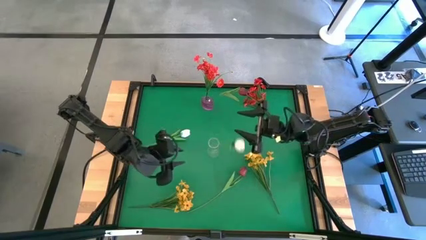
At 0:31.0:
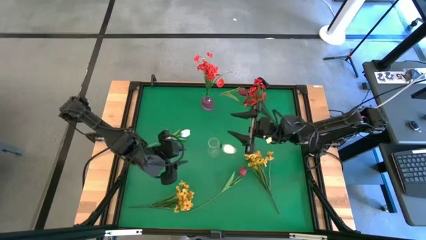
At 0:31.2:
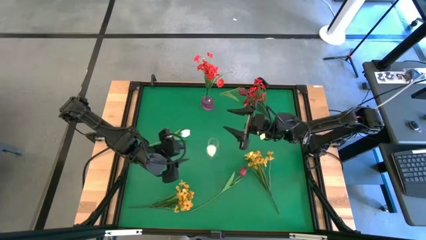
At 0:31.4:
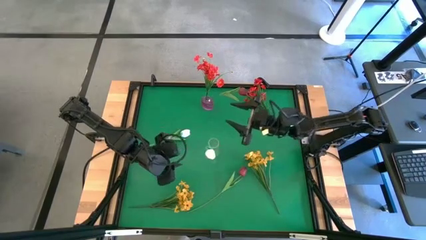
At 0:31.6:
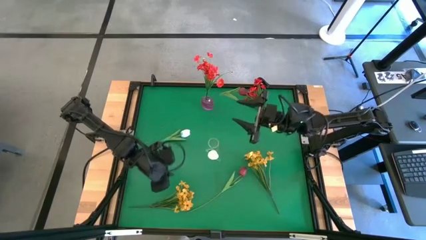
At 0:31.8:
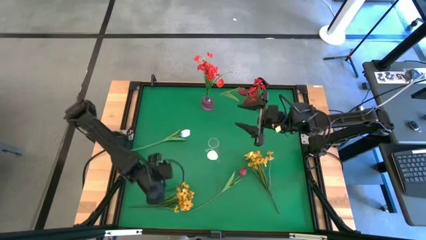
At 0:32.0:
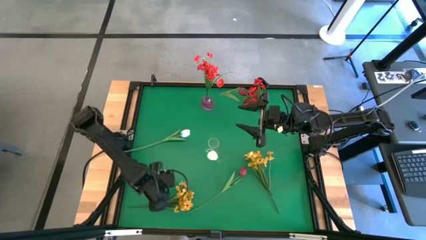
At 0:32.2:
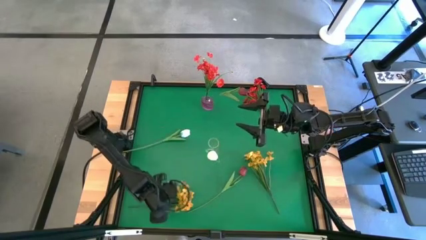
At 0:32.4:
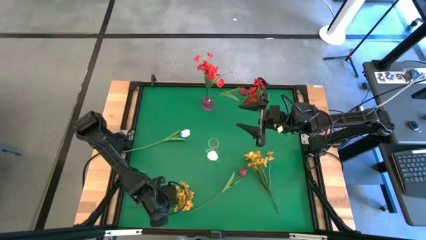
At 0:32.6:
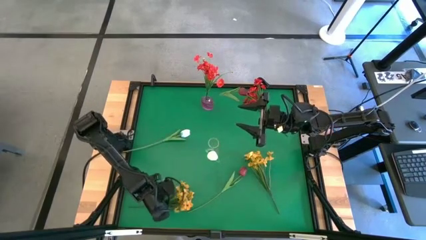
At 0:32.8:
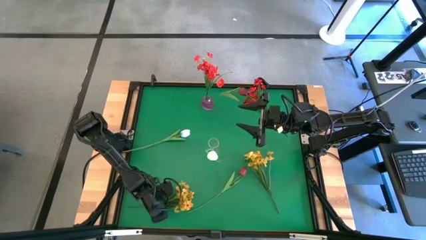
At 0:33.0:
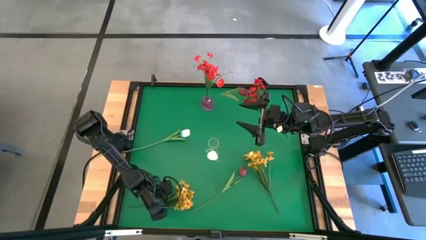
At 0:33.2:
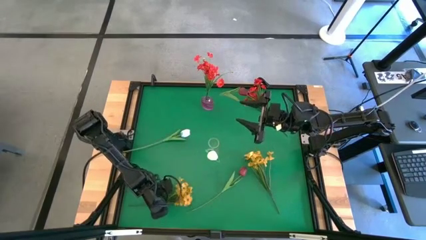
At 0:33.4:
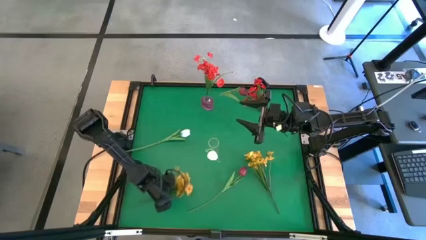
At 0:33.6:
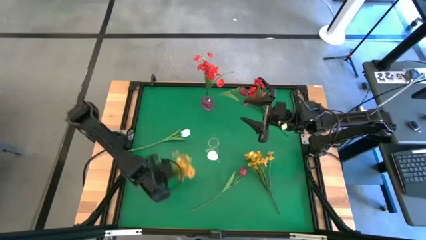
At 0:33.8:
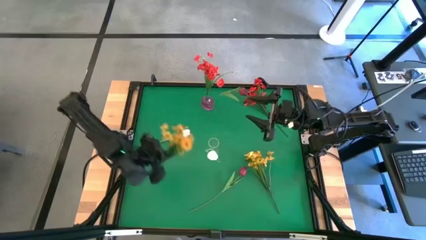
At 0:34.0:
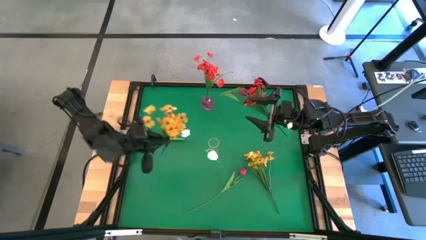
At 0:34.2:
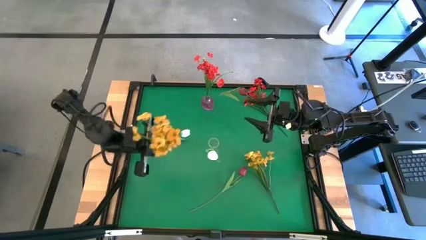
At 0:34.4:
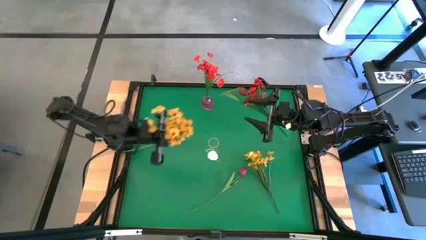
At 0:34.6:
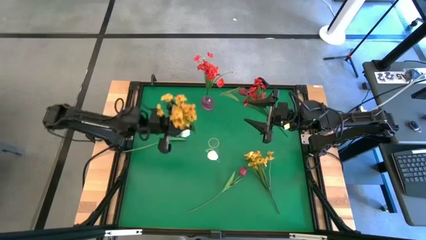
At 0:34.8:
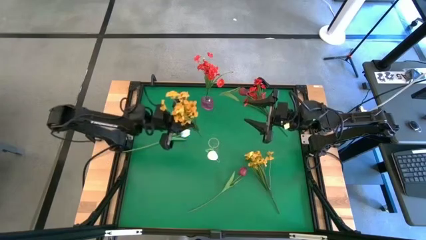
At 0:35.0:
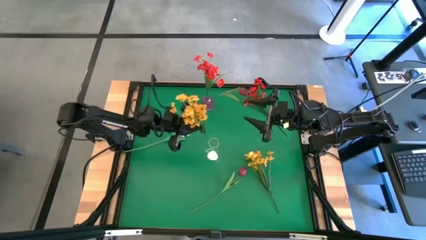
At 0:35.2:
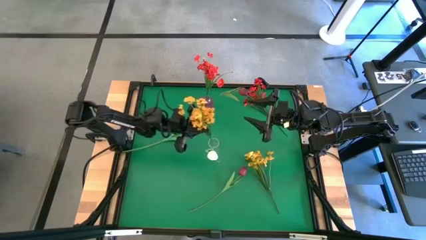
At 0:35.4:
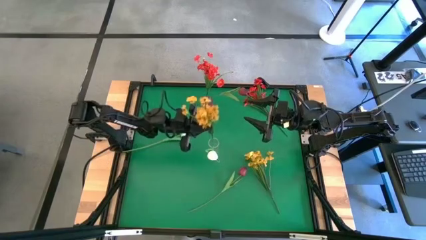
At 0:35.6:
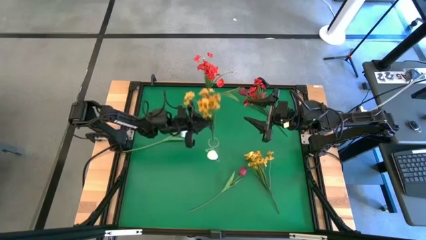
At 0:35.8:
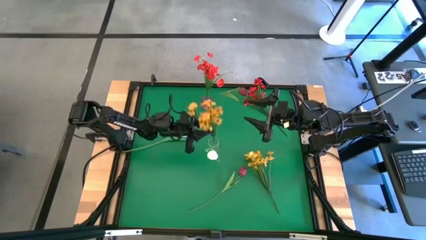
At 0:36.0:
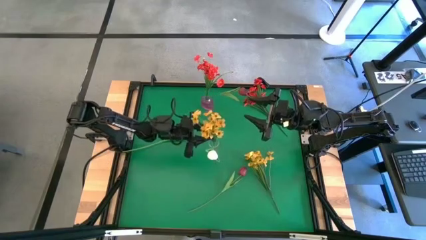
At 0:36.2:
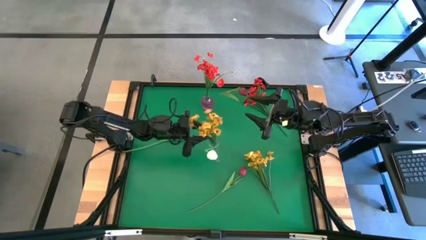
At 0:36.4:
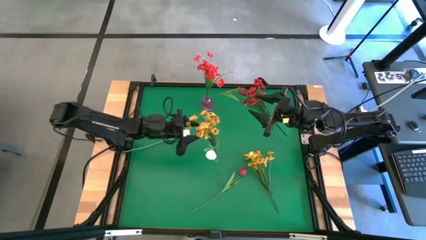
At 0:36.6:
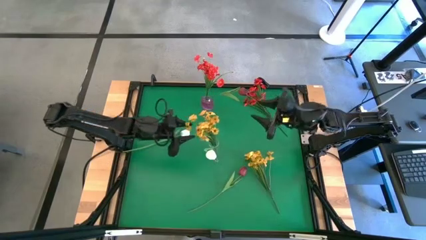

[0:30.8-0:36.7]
Task: Sort flowers into vase by color
Put the left yellow flowers into the transparent vase

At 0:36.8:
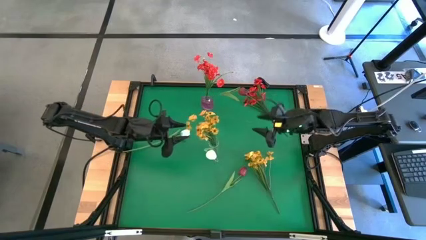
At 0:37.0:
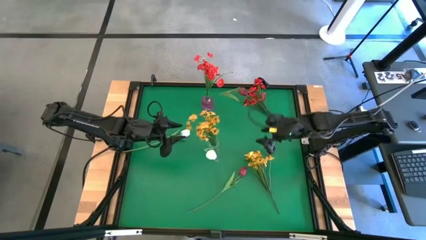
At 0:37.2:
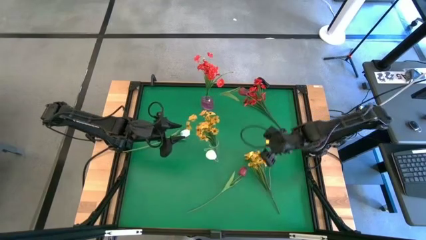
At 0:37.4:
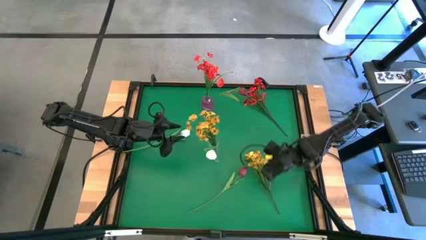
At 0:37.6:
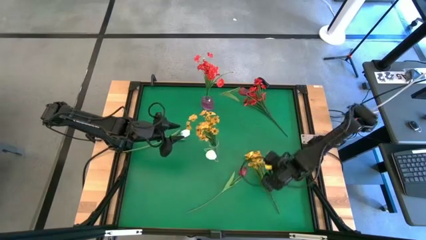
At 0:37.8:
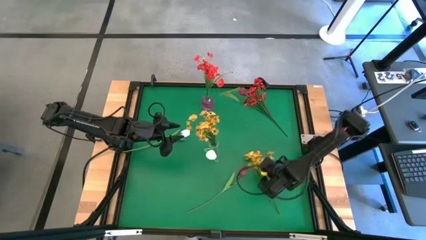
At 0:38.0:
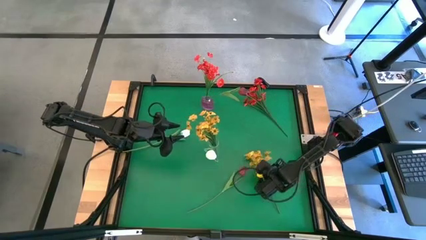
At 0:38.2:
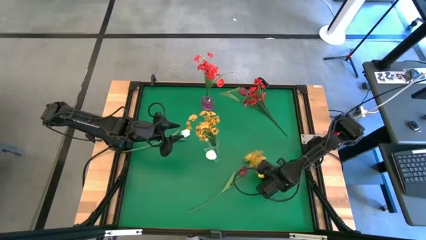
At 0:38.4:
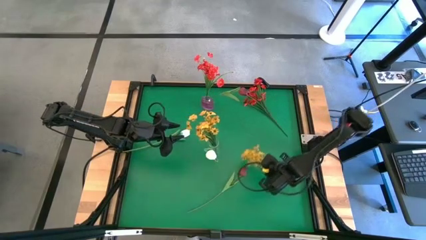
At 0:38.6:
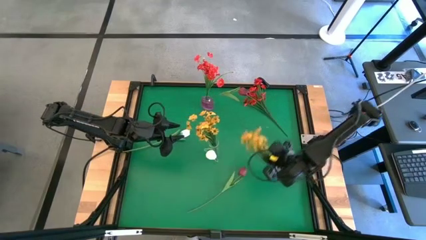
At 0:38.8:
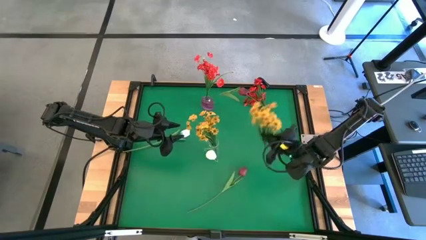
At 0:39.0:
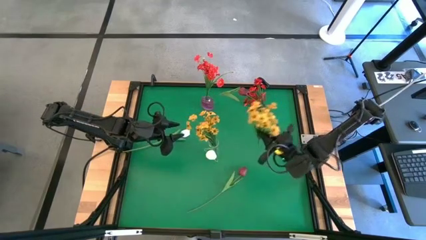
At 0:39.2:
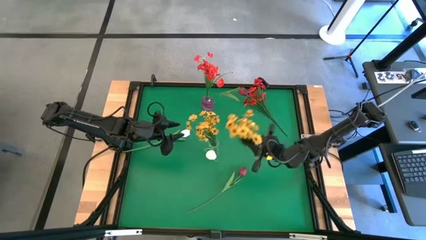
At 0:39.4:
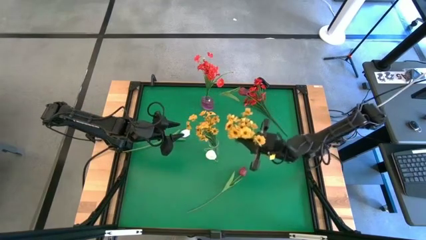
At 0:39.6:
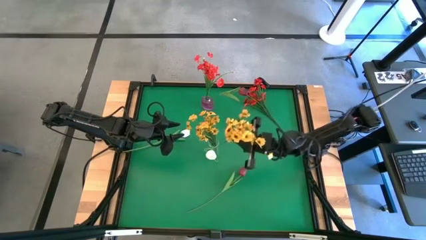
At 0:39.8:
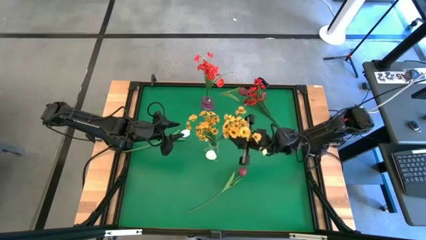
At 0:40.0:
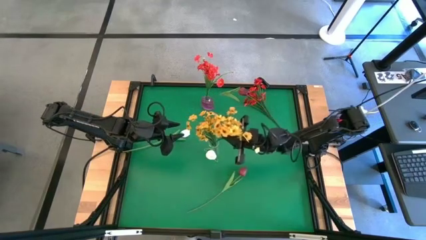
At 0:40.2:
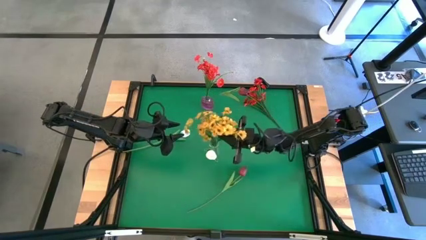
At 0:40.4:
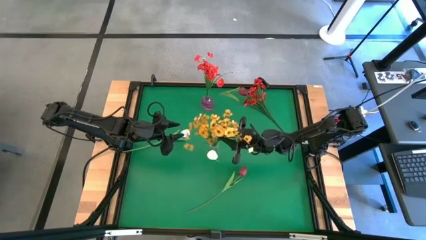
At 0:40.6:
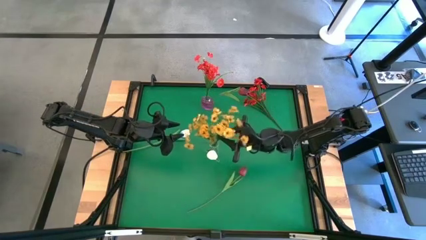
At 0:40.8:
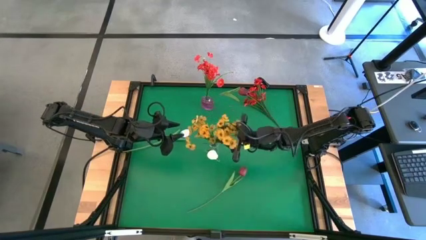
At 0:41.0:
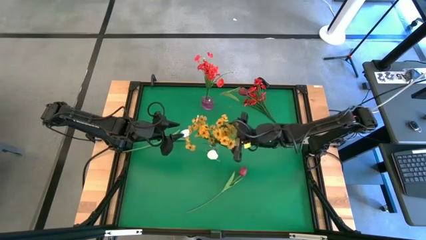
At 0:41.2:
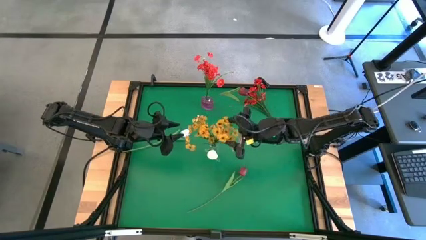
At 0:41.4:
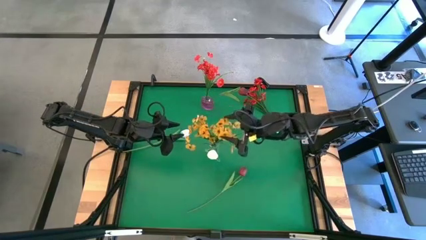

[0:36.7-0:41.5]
Put the yellow flowers into the transparent vase

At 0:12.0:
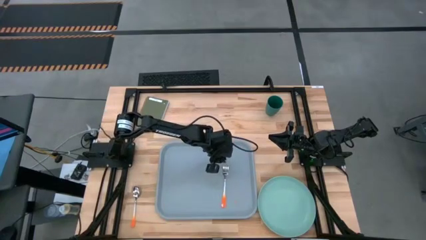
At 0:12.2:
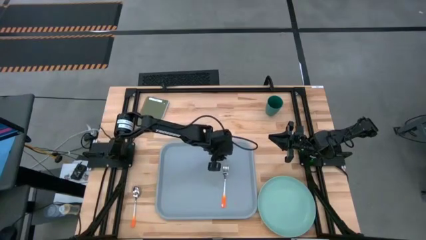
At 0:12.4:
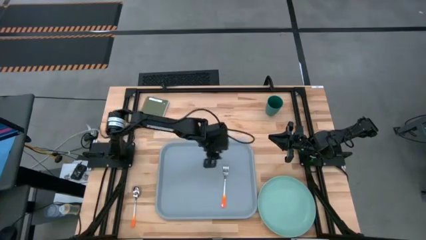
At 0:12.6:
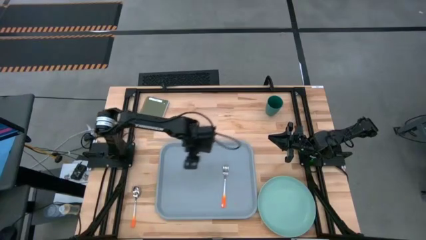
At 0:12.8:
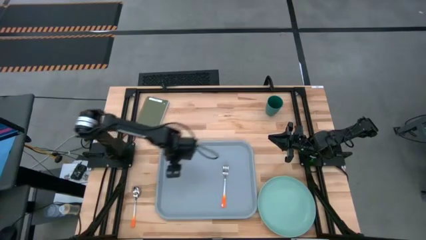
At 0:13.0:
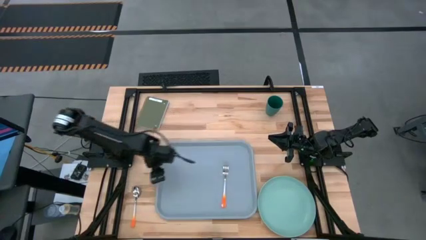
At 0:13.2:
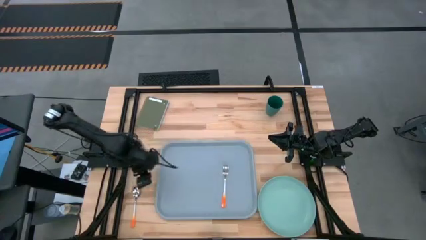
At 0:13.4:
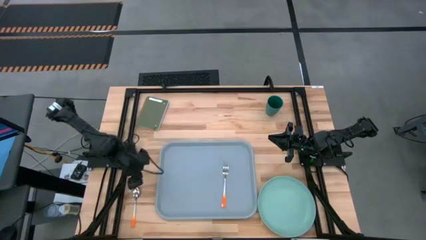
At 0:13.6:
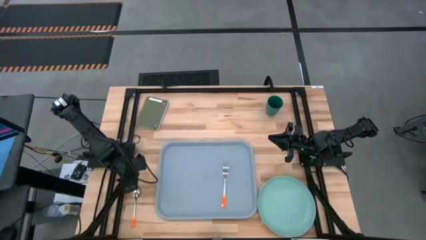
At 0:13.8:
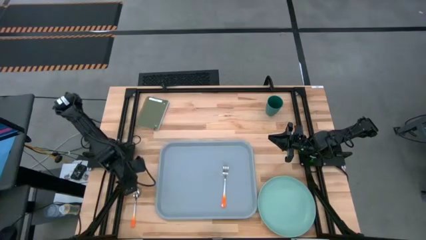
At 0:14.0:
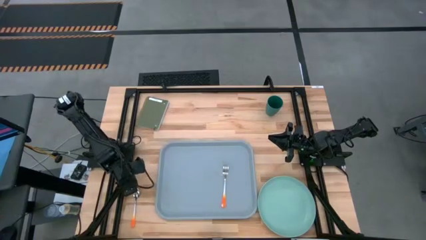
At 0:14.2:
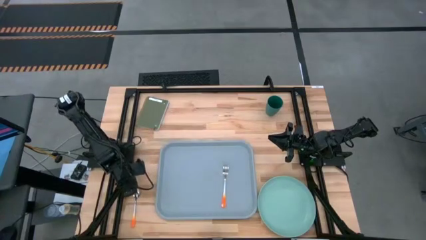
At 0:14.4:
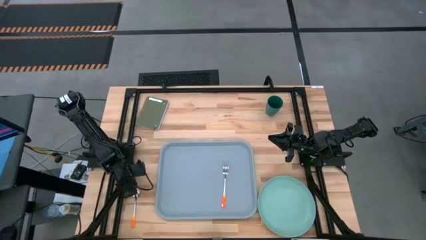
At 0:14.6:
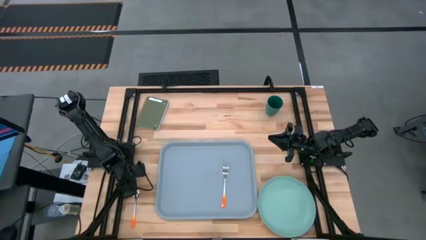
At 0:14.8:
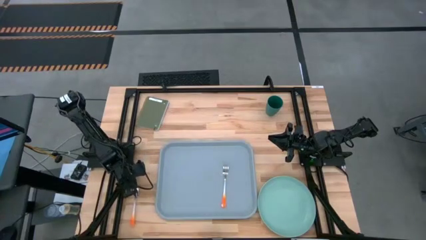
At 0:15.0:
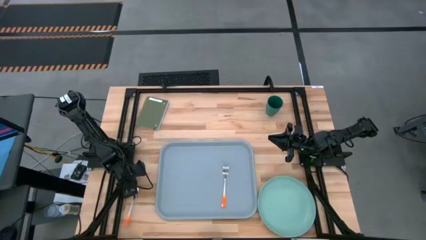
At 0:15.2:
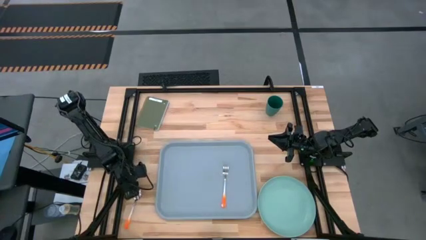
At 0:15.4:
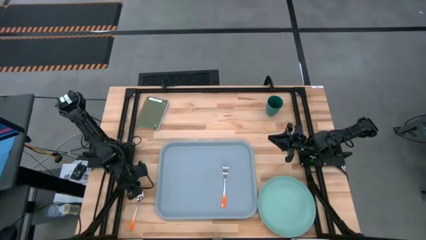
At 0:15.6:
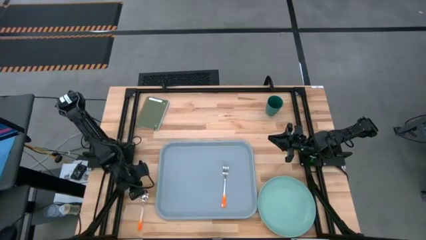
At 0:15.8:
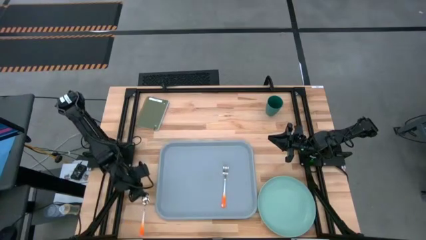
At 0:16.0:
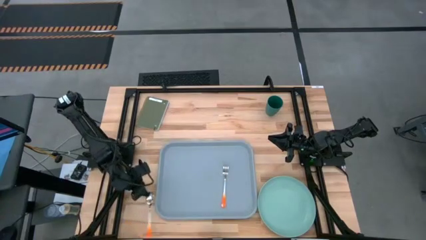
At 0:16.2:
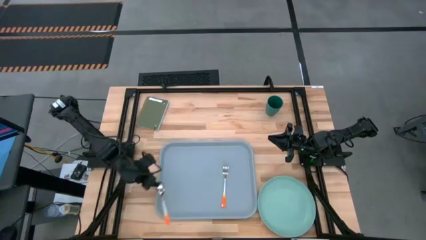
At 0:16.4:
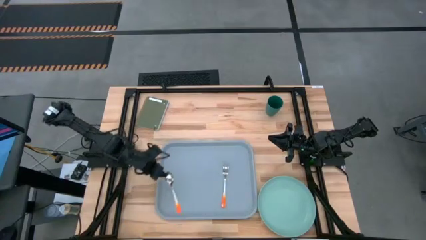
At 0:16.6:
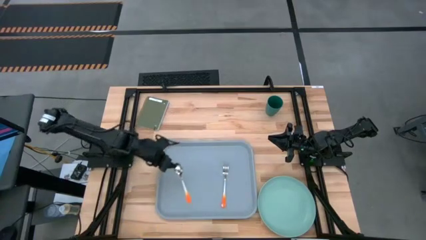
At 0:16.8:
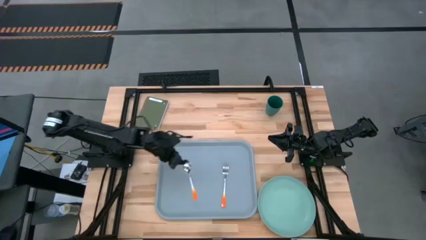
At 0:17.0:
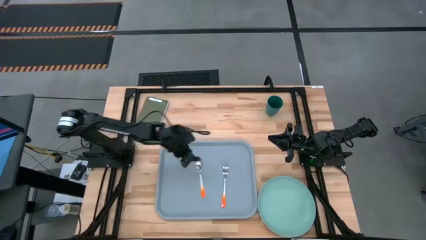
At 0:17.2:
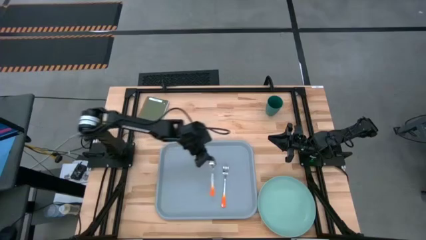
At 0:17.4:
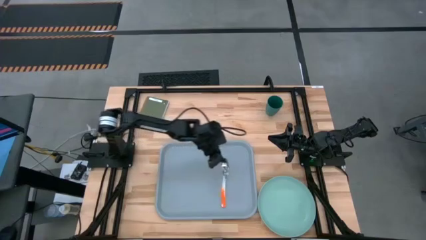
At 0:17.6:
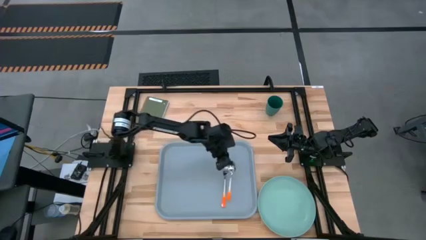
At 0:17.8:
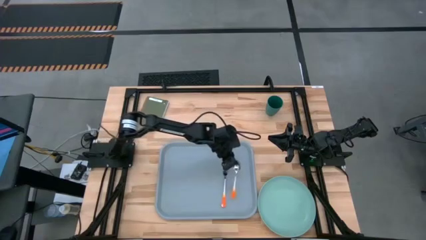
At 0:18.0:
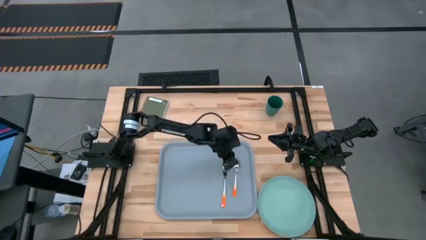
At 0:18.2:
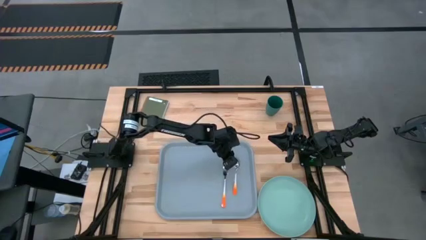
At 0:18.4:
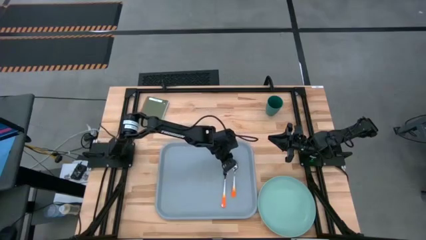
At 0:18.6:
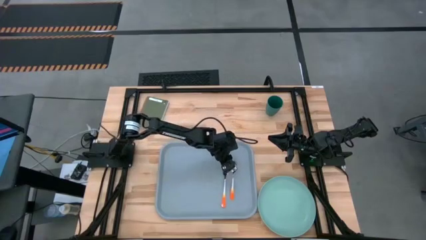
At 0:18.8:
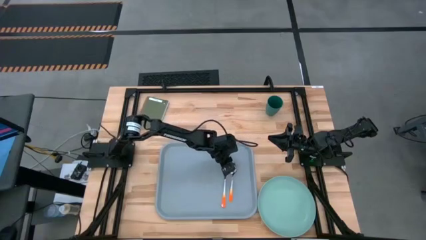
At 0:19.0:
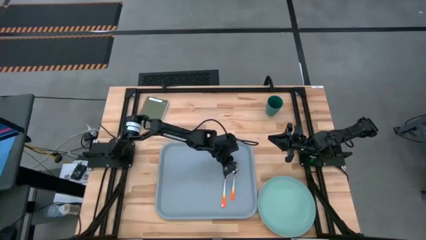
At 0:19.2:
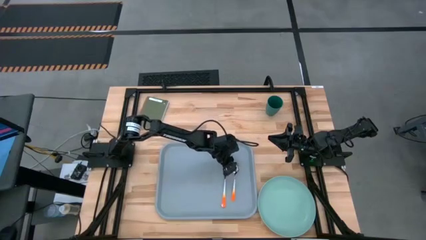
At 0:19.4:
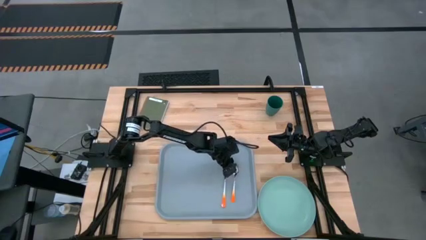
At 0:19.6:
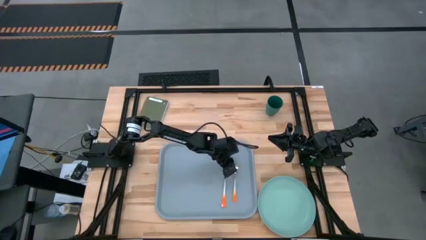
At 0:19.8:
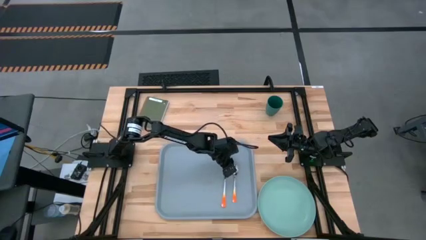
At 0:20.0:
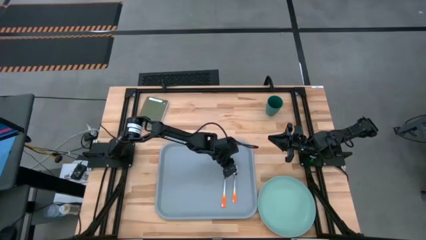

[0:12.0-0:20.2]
Task: Pick and place plate/cup/fork/spoon on tray
Put the orange spoon to the right of the orange fork on the light gray tray
